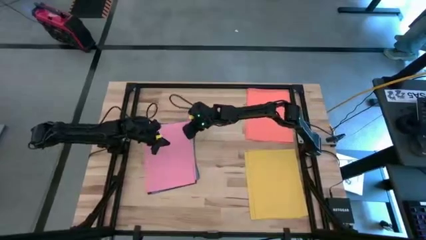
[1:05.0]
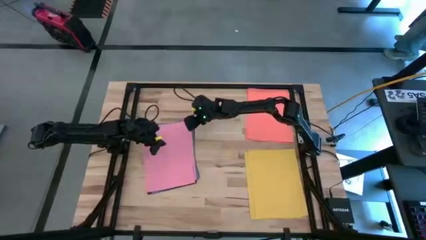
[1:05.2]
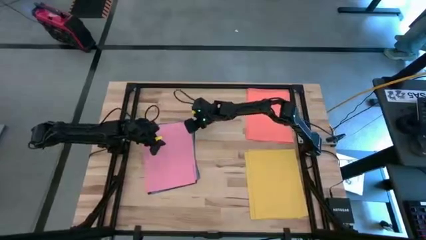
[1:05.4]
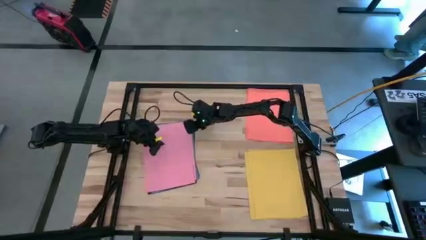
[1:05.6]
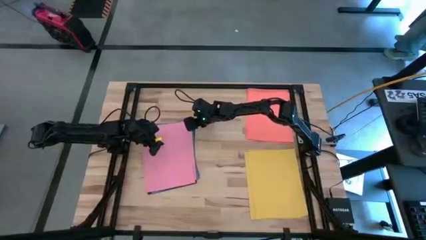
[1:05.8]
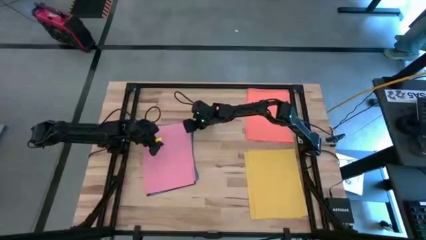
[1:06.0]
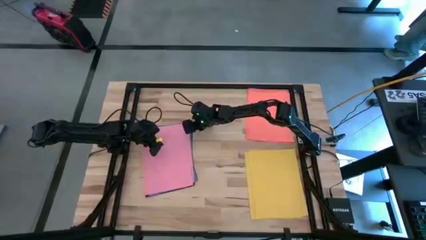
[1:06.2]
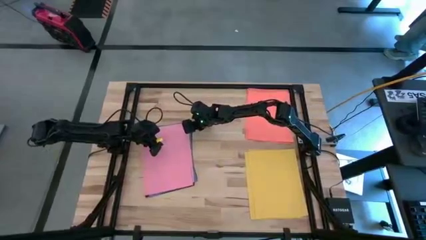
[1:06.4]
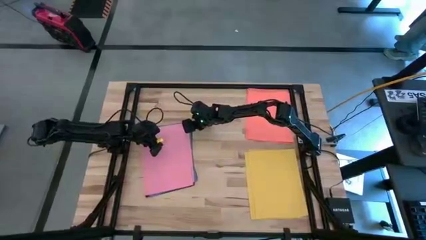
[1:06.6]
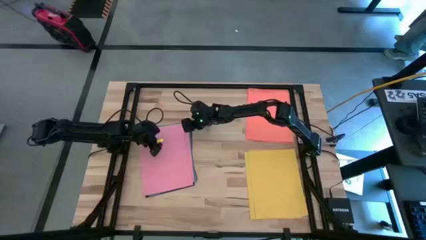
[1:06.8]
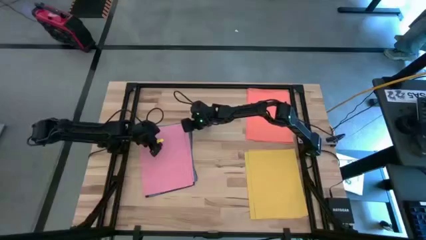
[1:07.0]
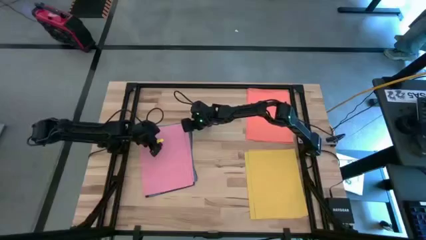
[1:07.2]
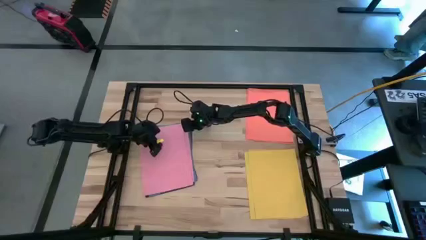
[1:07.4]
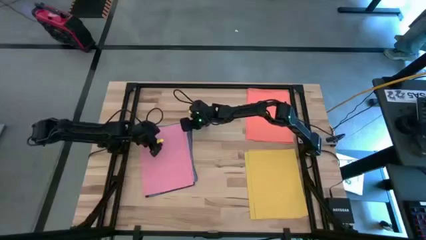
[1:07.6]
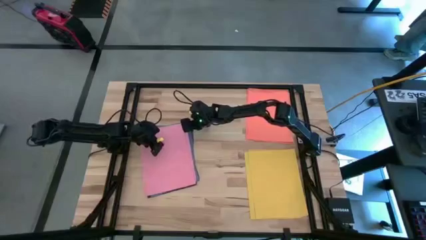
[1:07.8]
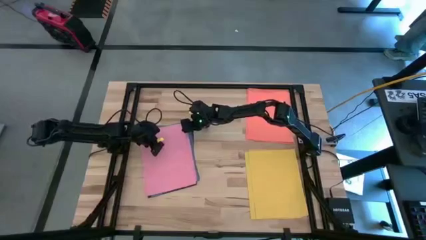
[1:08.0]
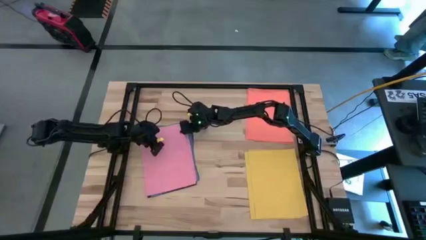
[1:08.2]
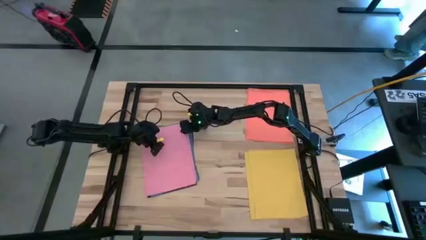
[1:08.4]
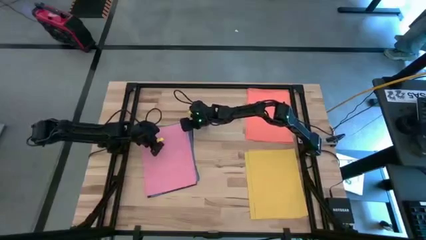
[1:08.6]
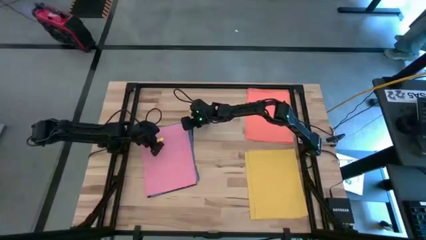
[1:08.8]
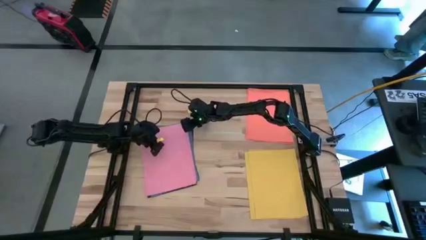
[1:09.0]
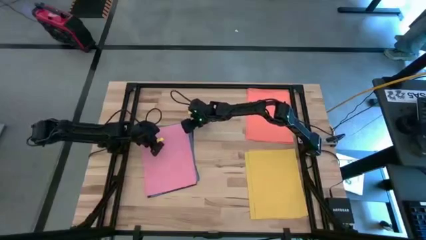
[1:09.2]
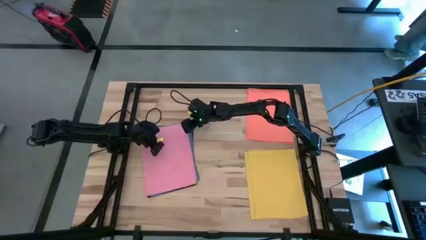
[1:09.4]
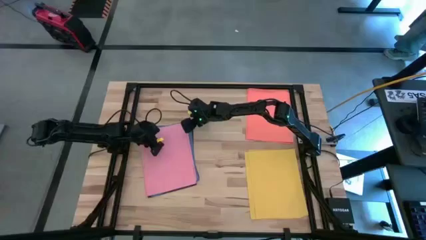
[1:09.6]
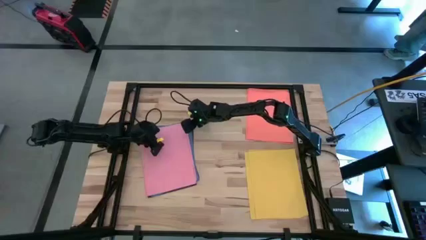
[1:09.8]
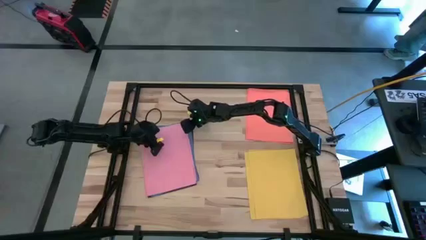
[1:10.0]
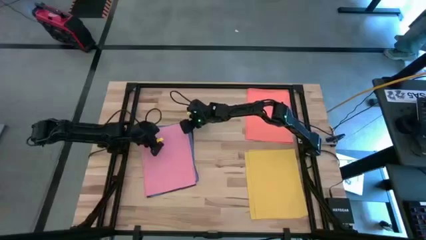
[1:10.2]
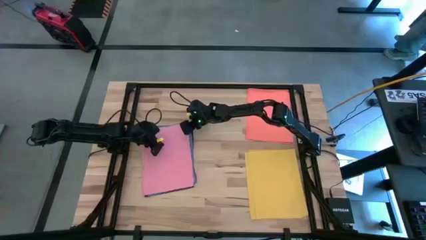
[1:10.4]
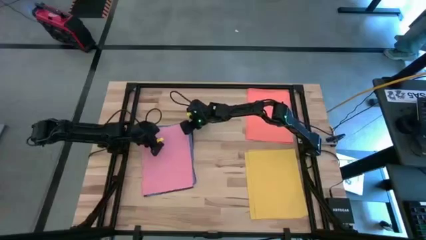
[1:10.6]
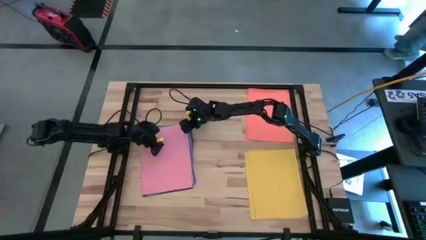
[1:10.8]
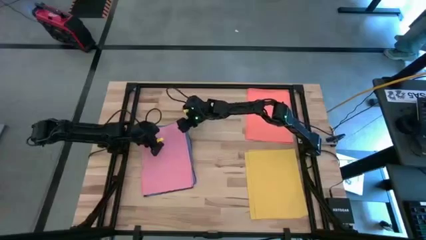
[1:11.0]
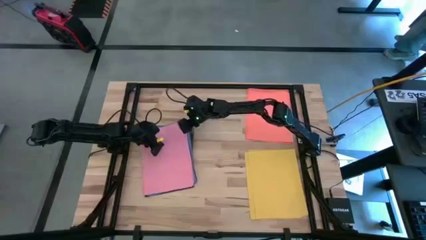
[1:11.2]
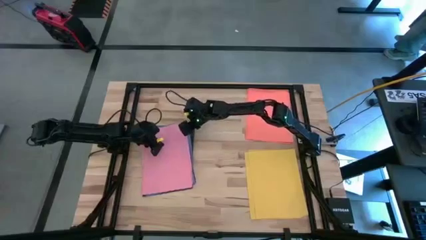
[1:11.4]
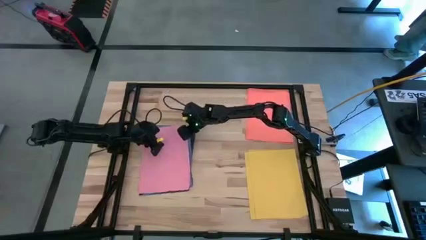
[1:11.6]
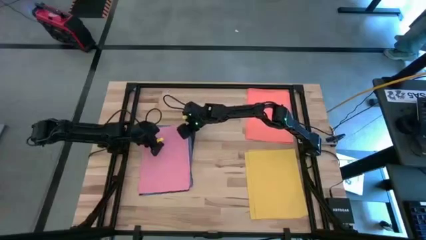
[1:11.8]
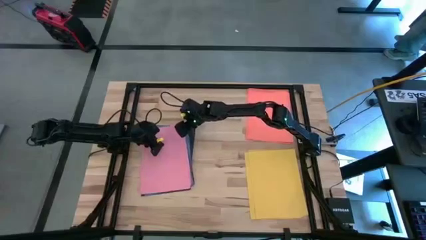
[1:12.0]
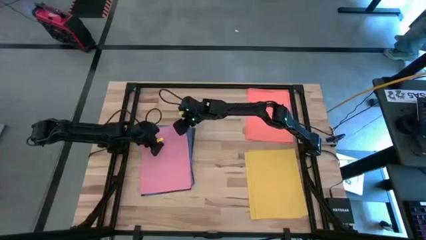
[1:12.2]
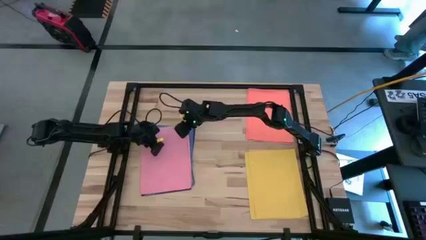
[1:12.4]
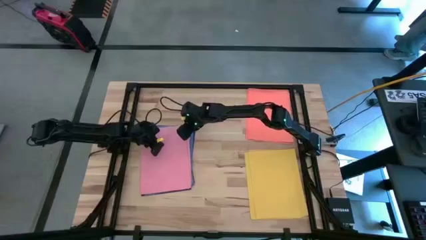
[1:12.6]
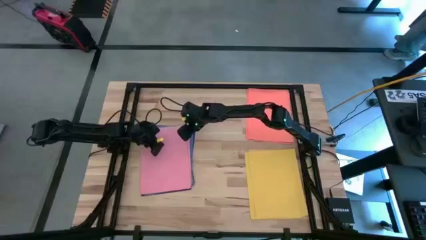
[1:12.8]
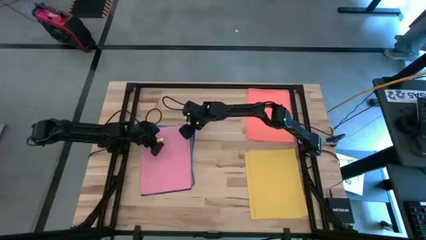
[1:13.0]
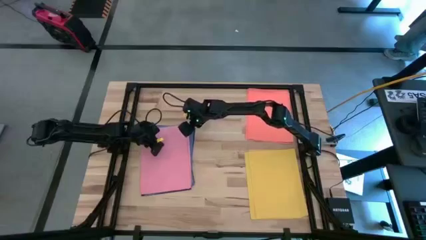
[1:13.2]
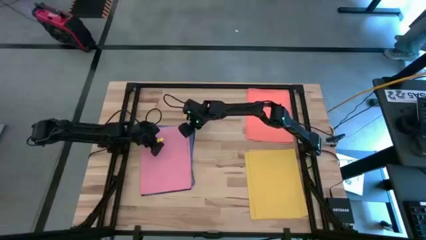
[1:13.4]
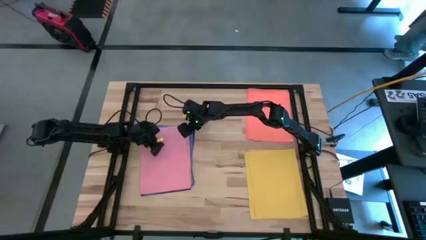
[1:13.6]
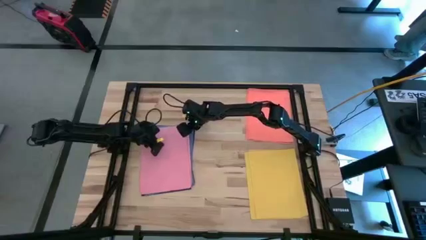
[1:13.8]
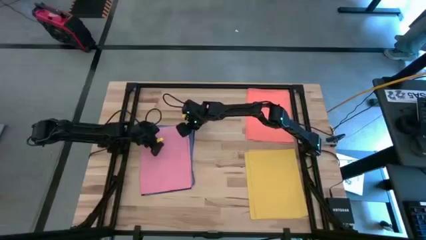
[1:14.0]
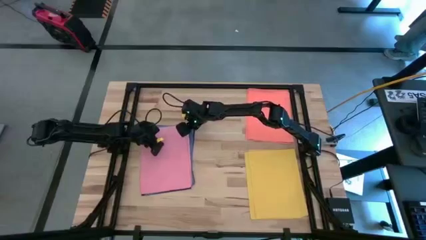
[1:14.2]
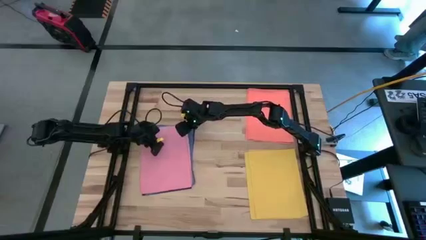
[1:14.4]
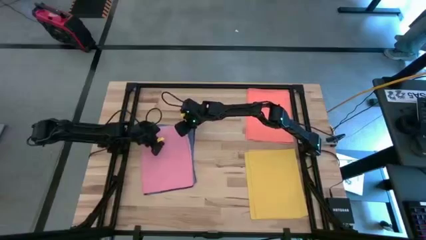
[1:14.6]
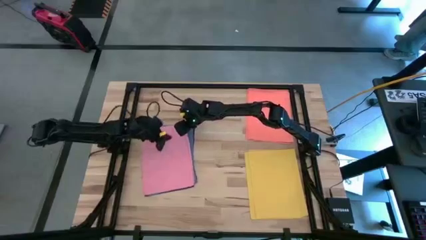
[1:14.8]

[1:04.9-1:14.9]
Task: Organize paper
Put all of the pink paper at the upper middle of the table

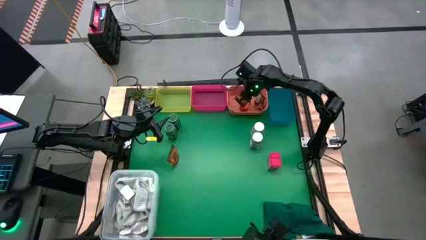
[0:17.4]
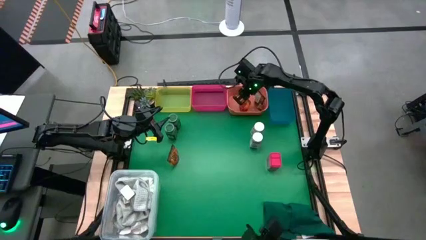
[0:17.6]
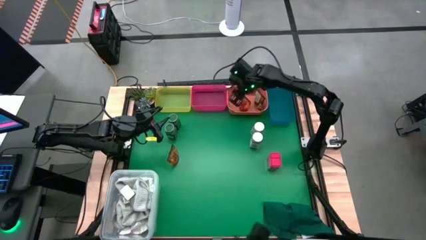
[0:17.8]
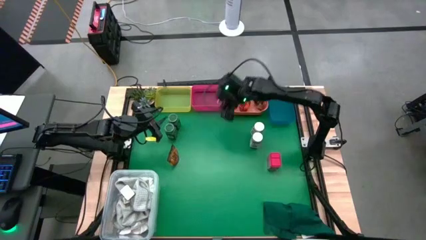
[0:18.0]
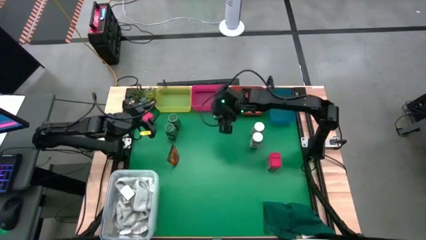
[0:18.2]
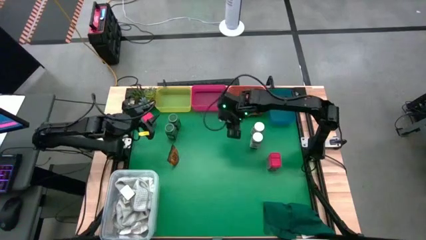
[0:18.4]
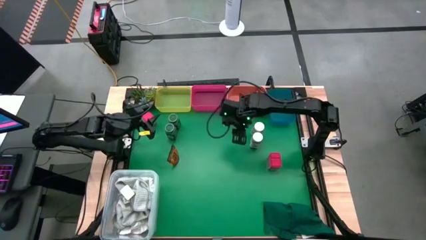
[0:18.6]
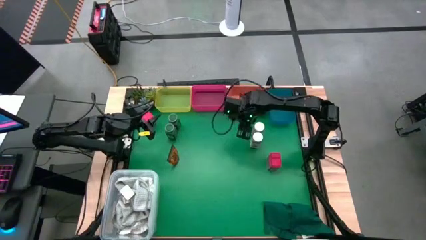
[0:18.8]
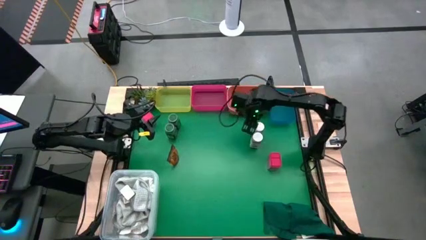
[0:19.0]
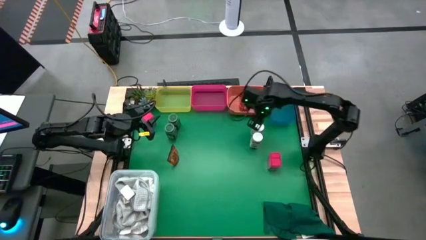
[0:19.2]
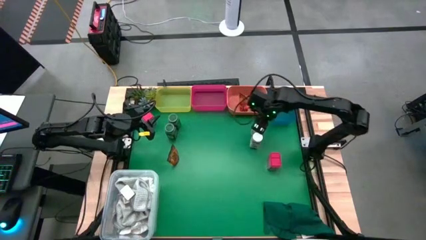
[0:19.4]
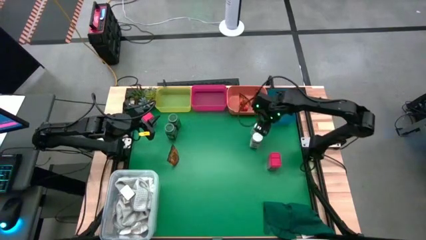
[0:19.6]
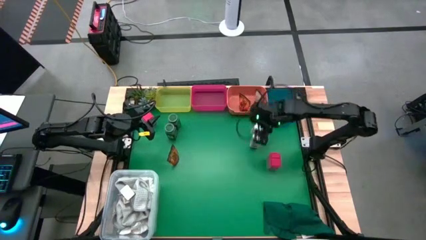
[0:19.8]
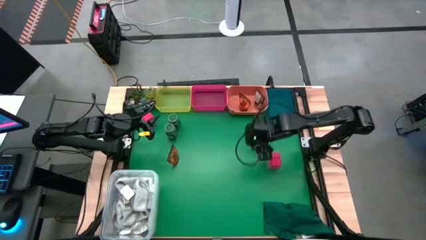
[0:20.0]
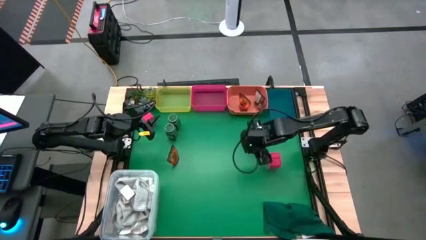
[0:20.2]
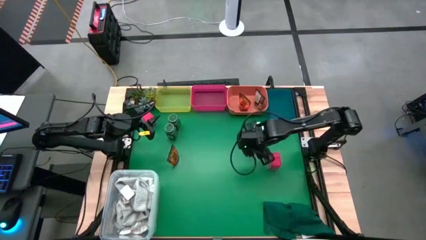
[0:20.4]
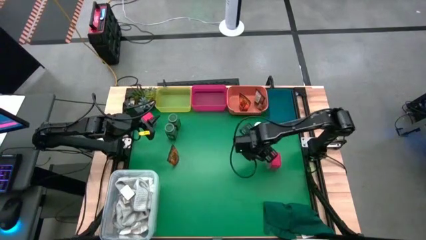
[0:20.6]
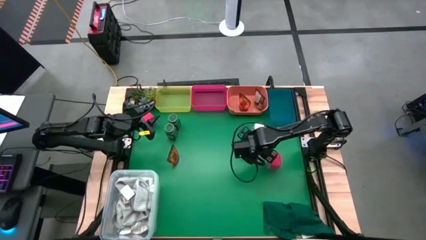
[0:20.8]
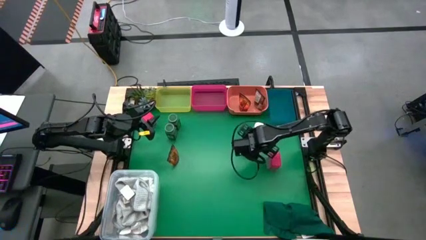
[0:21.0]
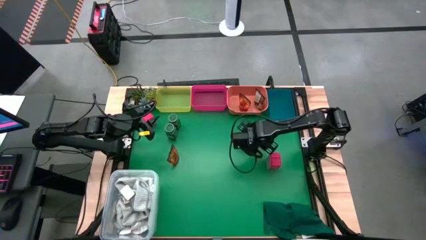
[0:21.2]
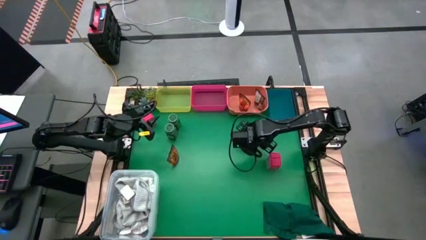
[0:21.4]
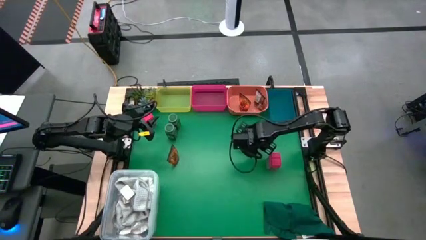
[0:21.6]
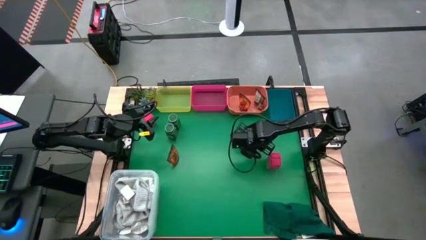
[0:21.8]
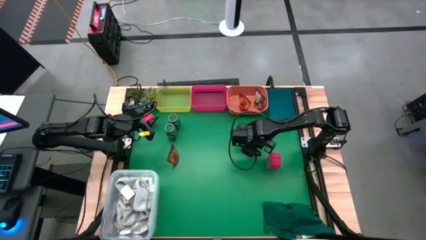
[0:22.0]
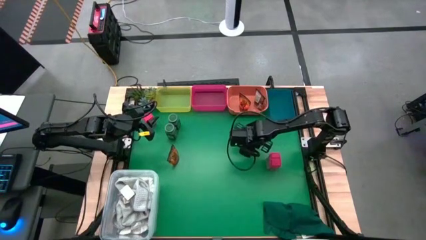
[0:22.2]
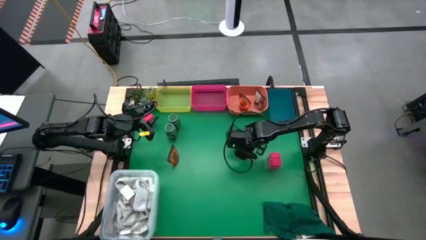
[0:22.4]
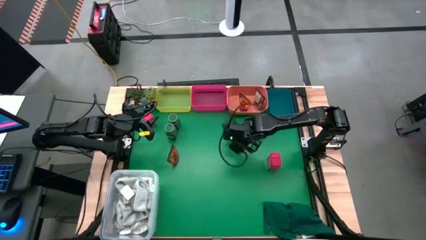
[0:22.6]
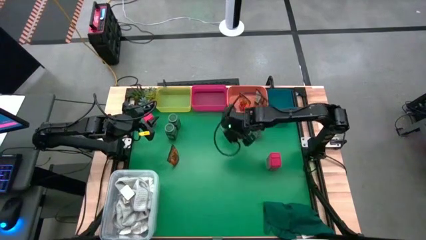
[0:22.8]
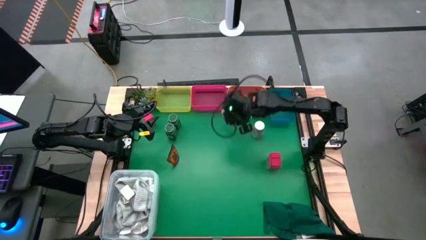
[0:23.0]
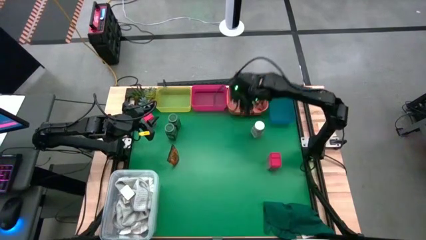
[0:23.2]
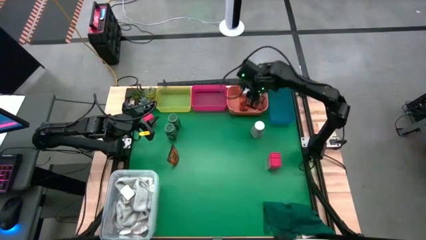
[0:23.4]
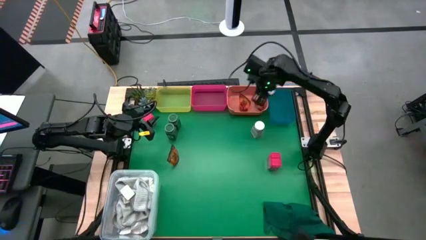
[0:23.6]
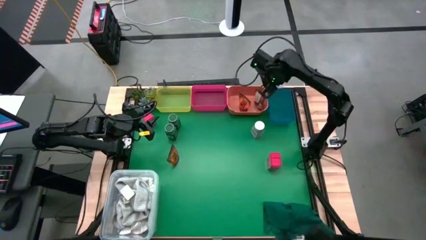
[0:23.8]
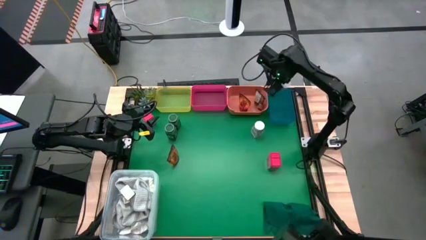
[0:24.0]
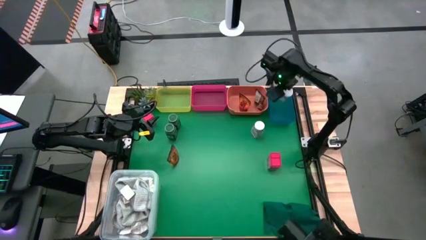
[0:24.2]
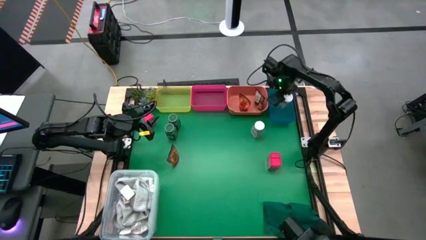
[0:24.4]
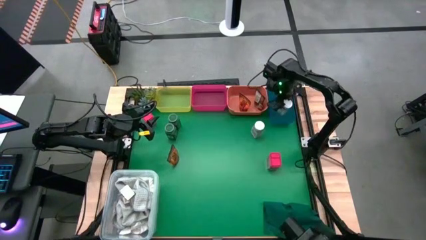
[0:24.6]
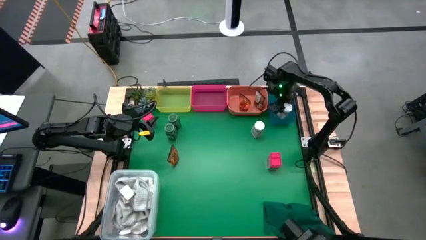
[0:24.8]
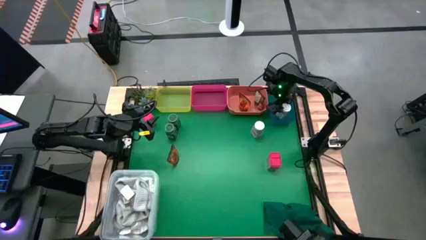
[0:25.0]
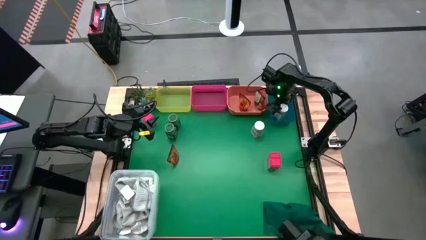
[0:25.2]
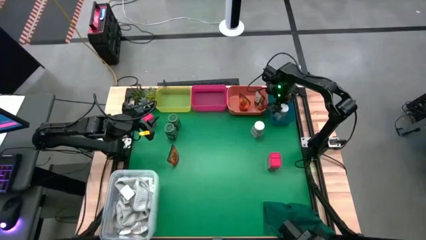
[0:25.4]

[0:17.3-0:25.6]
Task: Sort spices by type
Put the bottom white seasoning into the blue bin
